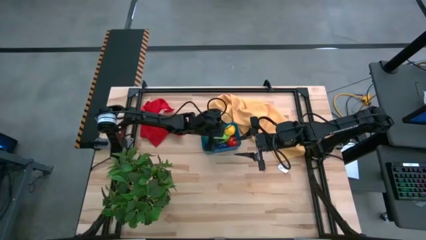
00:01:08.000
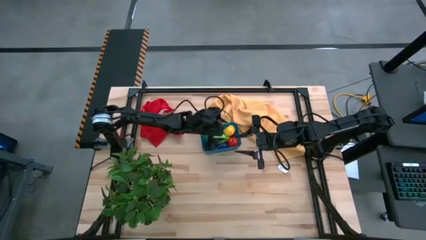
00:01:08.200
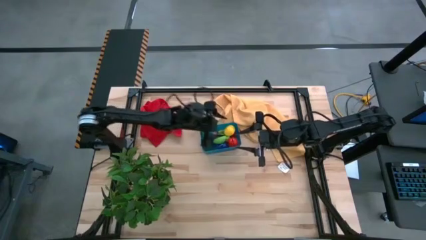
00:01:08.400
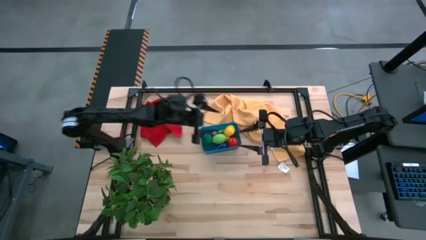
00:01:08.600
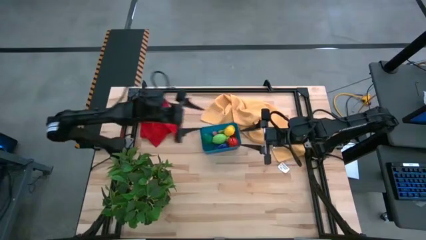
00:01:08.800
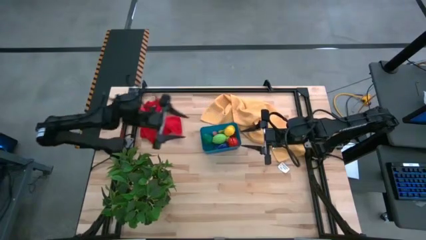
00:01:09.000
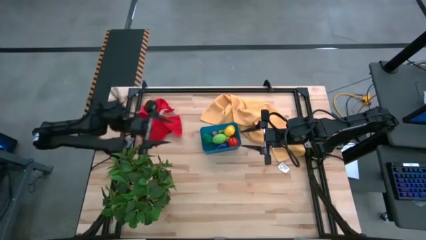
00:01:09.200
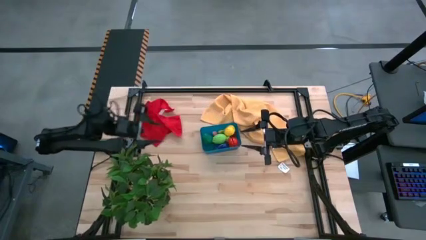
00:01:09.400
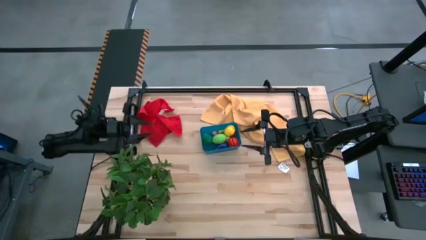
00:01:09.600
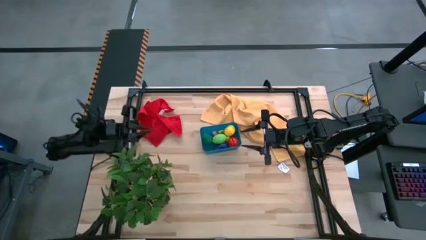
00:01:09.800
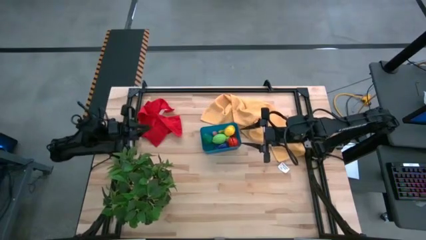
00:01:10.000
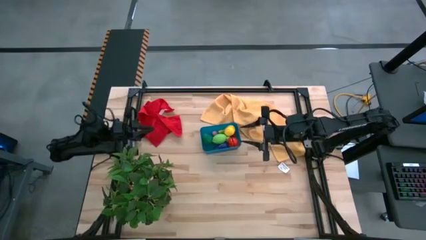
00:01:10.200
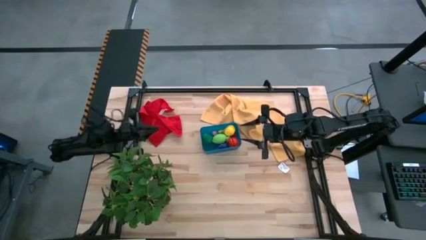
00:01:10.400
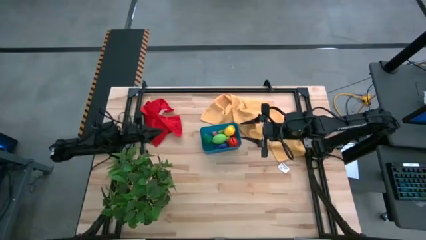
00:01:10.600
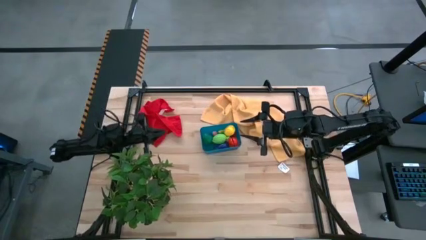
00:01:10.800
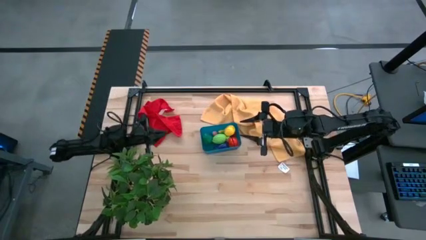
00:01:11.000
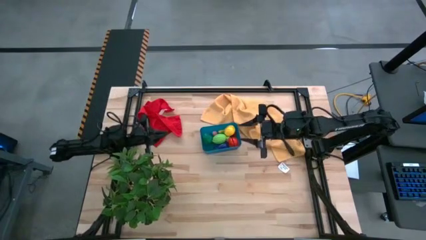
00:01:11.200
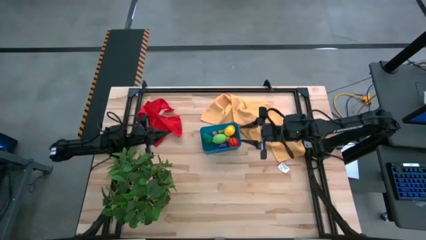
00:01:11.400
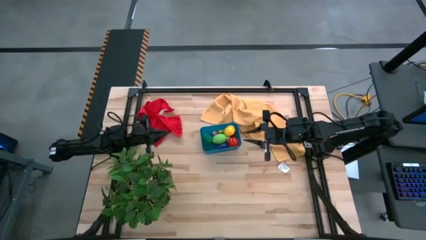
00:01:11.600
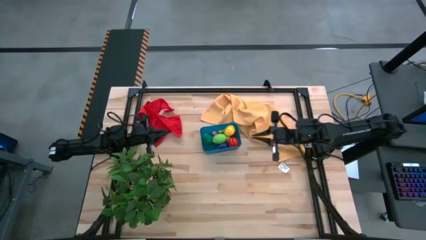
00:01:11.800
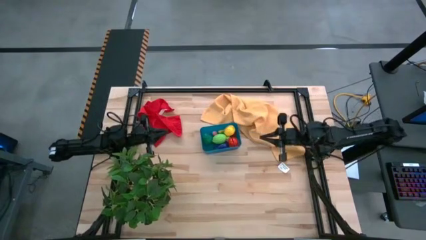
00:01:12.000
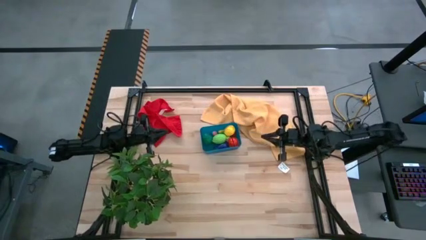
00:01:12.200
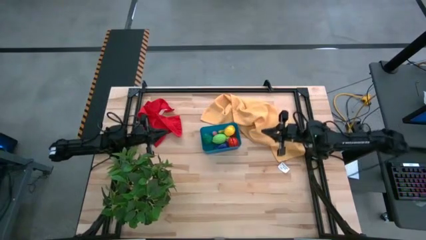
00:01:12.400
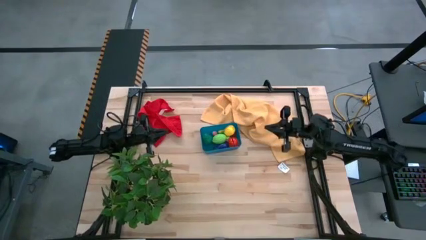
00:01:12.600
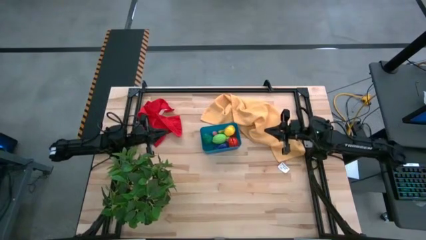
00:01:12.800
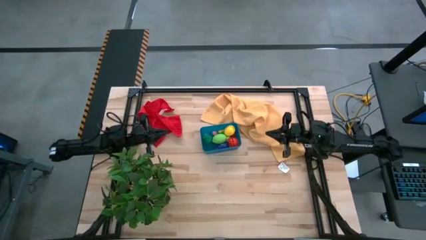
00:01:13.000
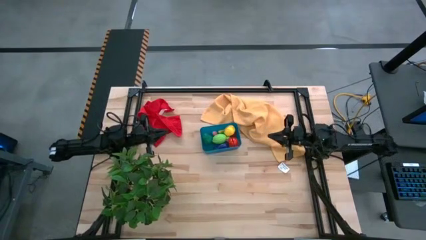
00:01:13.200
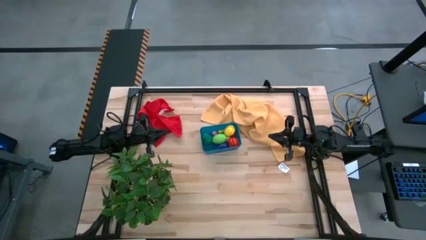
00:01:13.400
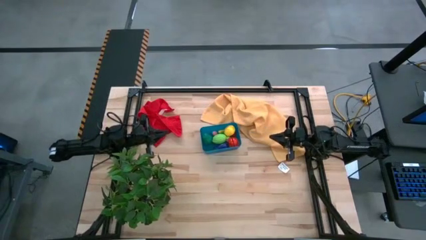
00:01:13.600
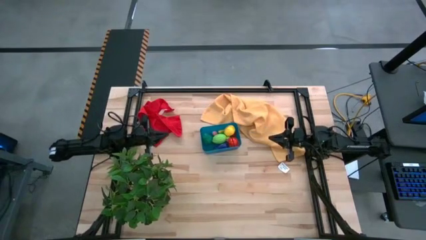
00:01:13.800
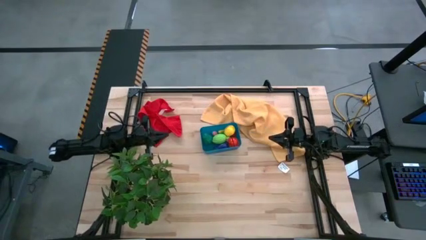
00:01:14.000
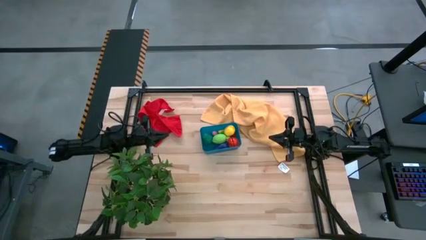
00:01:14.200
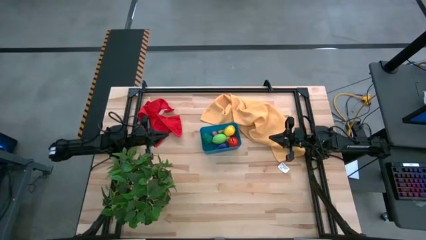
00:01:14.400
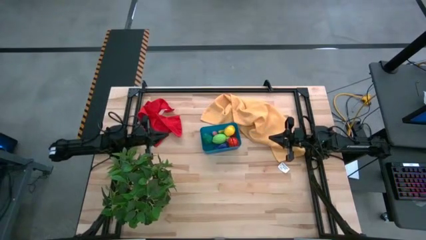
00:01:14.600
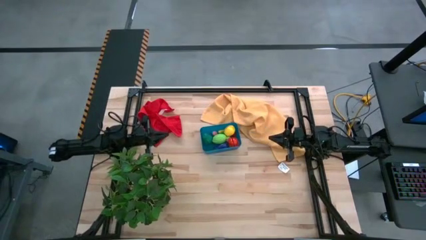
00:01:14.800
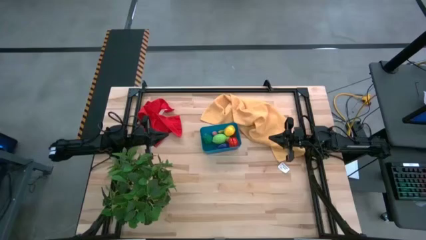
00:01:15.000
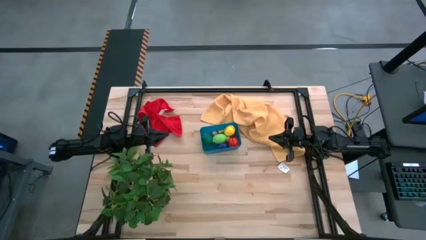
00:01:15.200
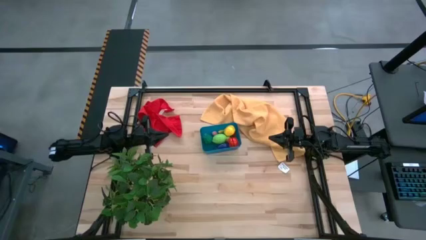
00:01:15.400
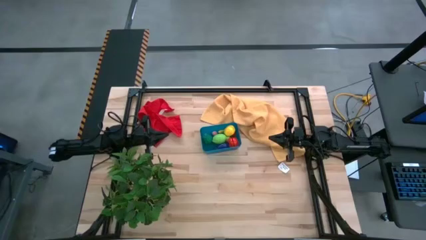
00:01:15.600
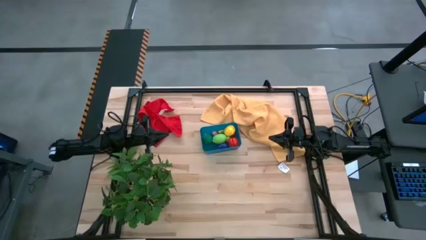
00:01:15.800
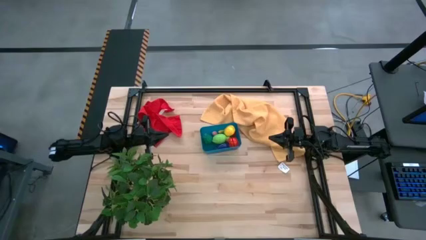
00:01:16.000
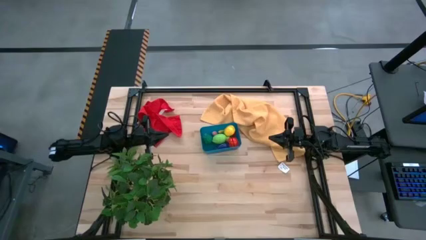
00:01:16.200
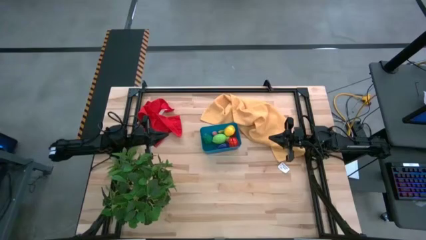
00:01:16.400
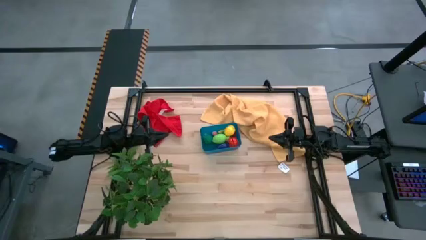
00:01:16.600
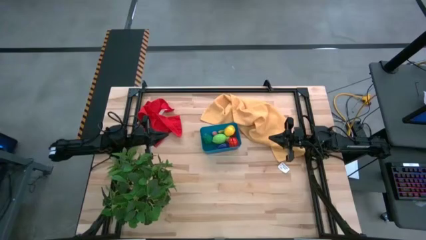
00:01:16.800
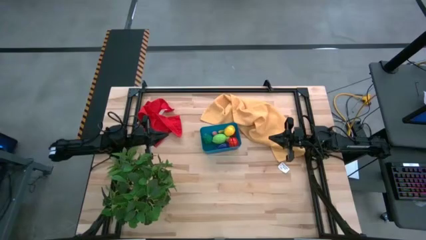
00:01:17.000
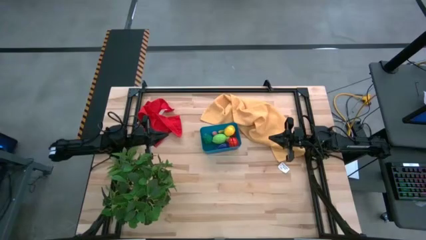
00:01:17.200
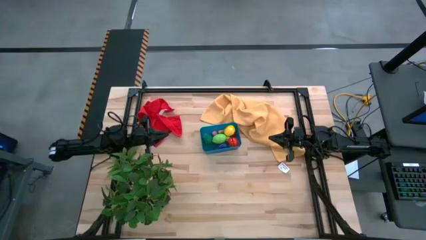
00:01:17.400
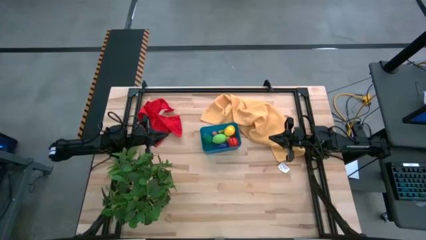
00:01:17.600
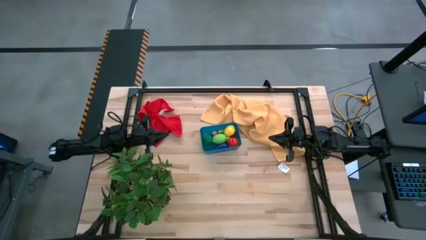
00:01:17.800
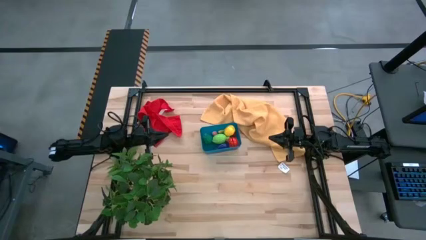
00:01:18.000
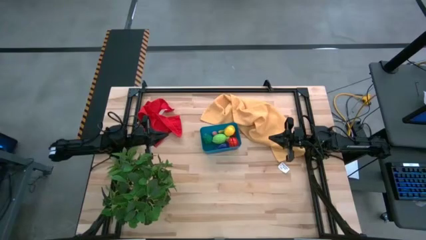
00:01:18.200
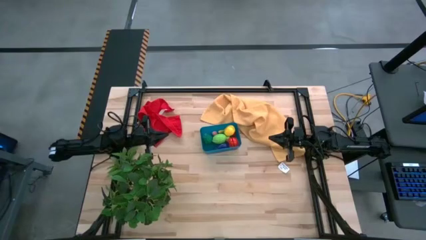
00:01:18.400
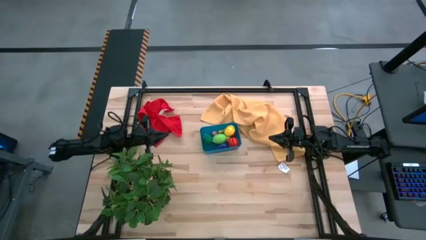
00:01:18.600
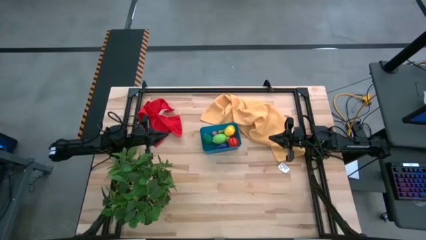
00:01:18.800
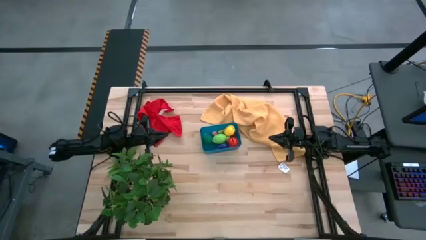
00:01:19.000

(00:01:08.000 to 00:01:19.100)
Task: Pick and placing Produce into tupperware
Return to Home Position

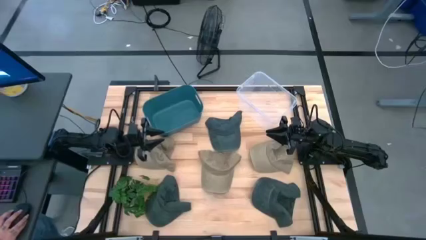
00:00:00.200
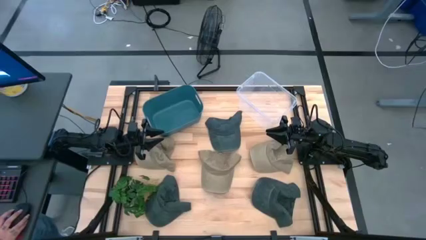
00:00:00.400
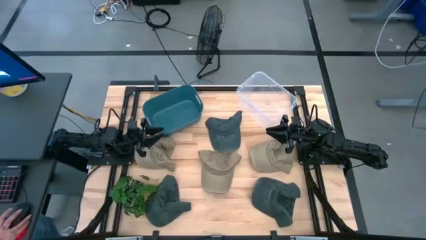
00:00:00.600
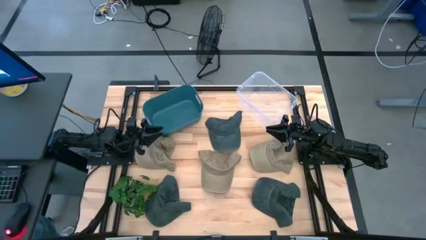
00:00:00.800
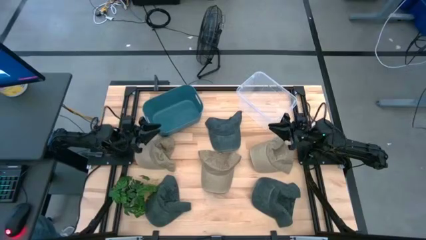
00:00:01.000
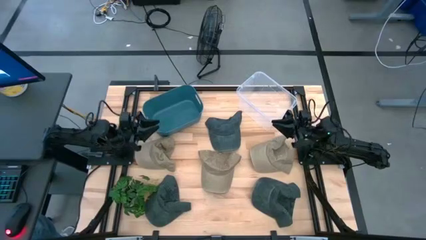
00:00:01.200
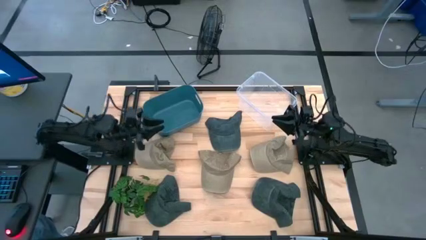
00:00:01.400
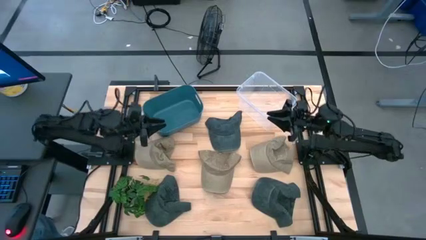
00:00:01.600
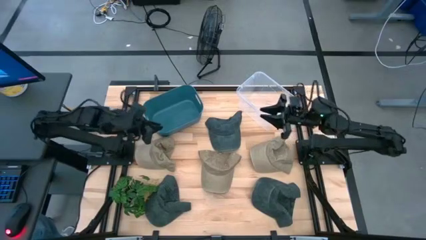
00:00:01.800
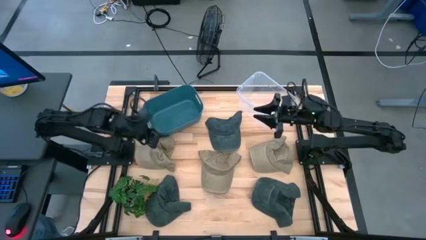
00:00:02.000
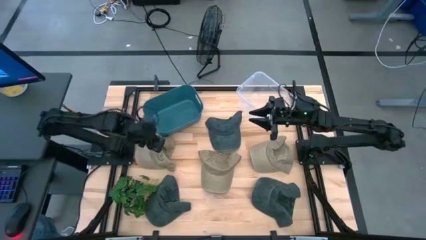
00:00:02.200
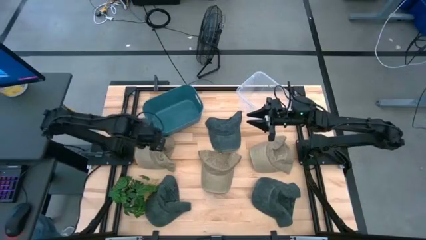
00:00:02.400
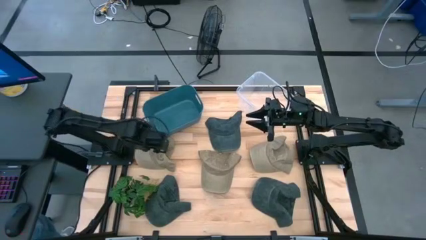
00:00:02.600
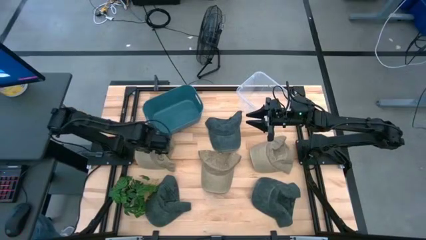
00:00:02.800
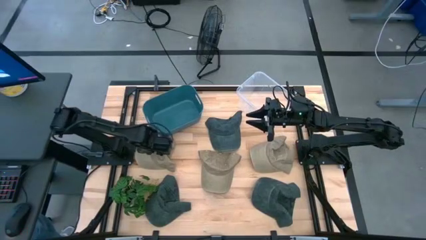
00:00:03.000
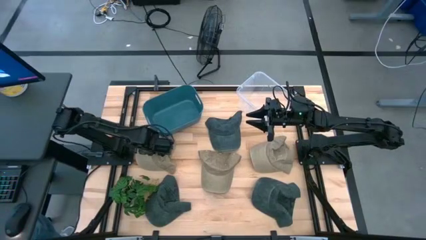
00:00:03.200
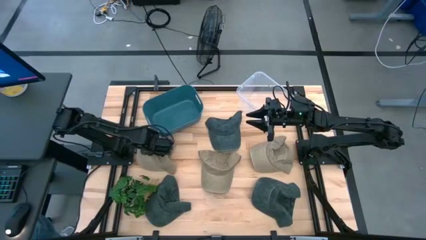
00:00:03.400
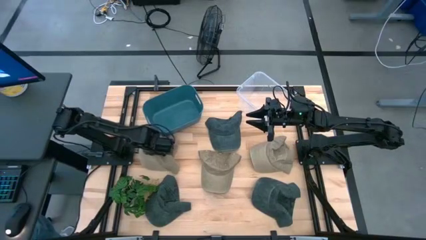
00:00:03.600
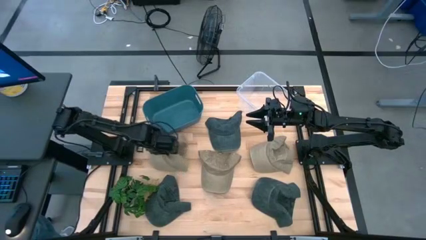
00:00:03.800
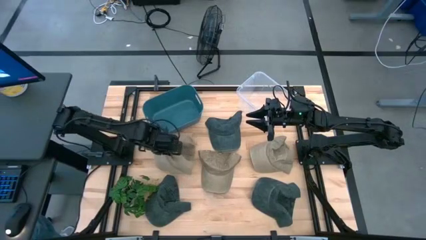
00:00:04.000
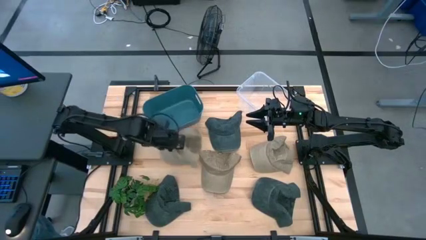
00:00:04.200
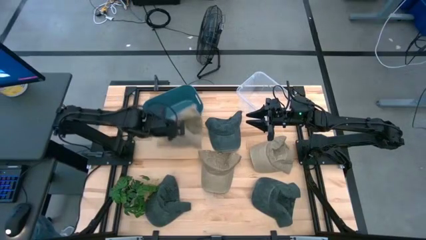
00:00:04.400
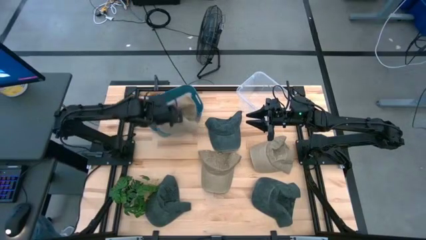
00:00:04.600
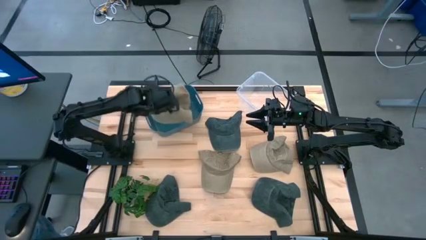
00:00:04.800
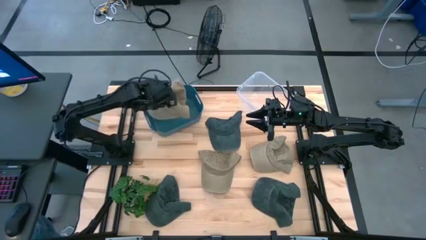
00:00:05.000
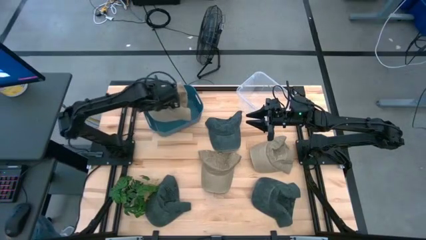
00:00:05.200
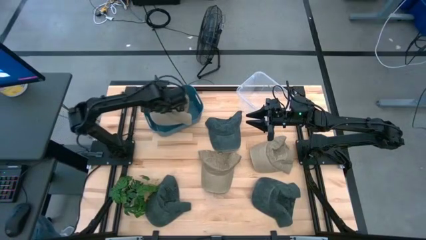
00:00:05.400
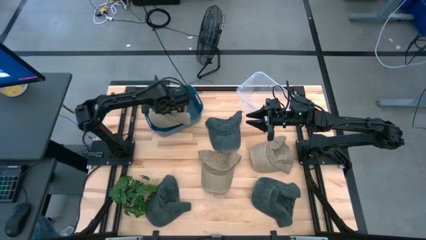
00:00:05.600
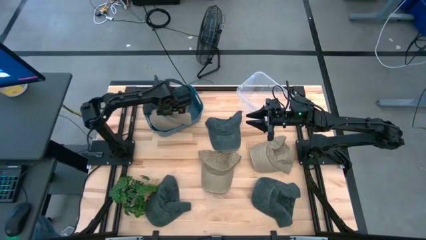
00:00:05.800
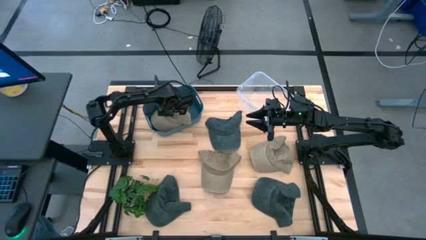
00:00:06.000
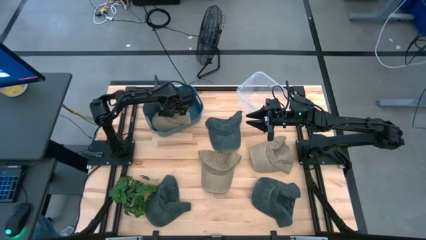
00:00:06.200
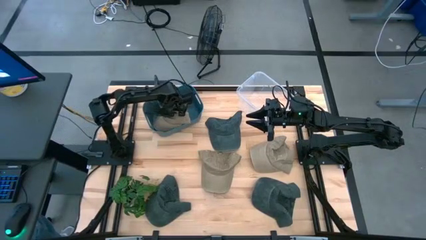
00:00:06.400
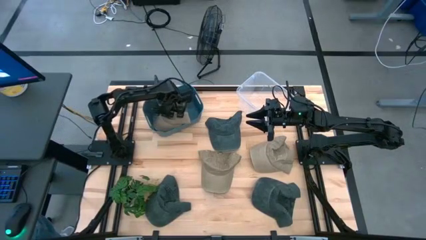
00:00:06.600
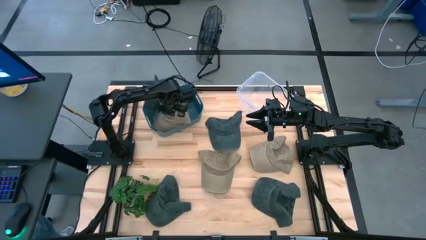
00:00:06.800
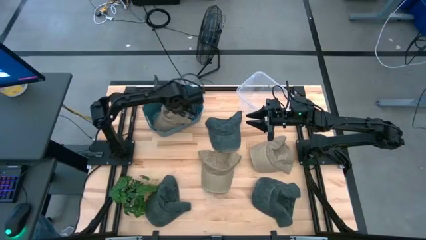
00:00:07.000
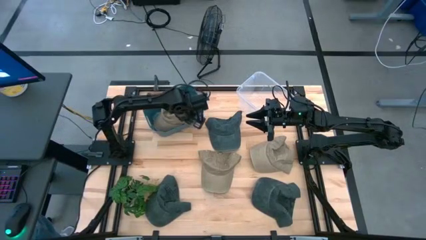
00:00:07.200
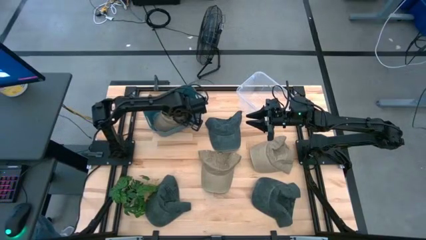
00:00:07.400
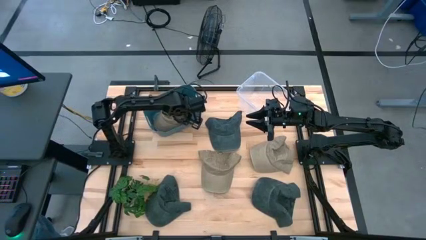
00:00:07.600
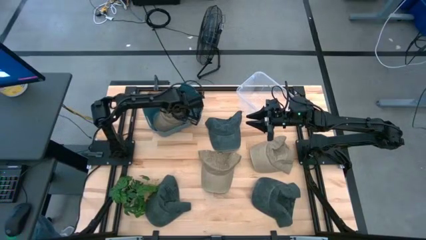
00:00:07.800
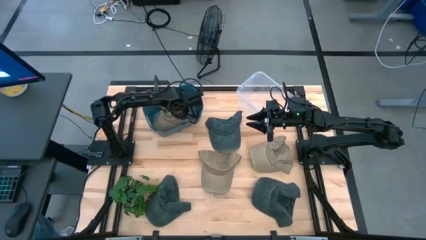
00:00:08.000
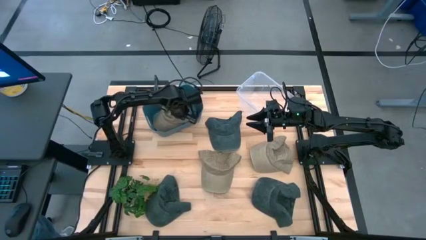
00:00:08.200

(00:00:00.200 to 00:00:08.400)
Task: Pick & Place hat
Put the left brown cap into the blue bin
